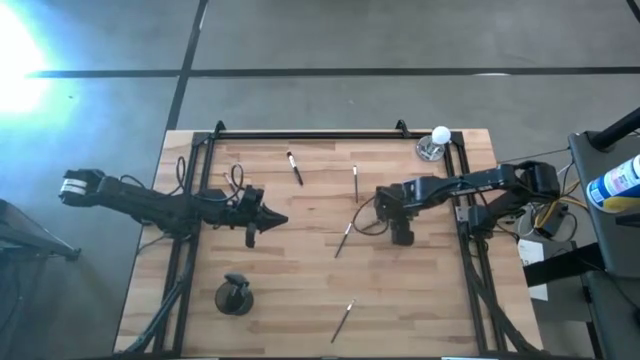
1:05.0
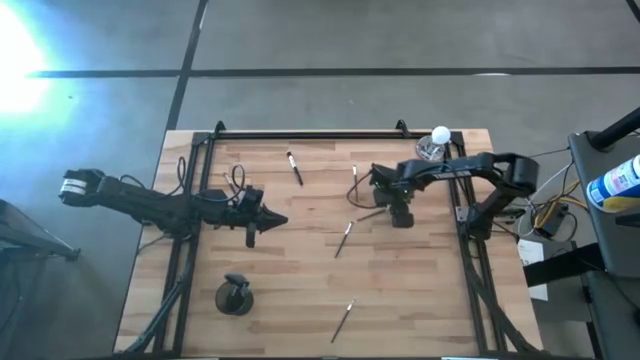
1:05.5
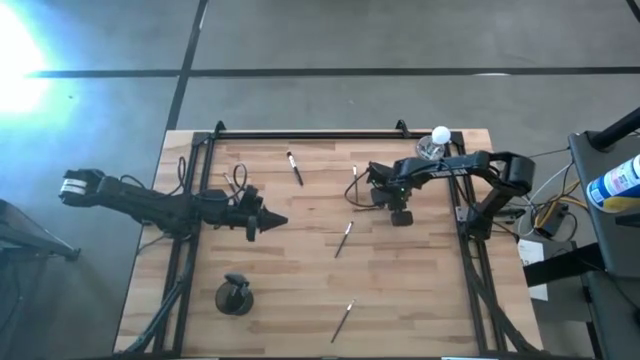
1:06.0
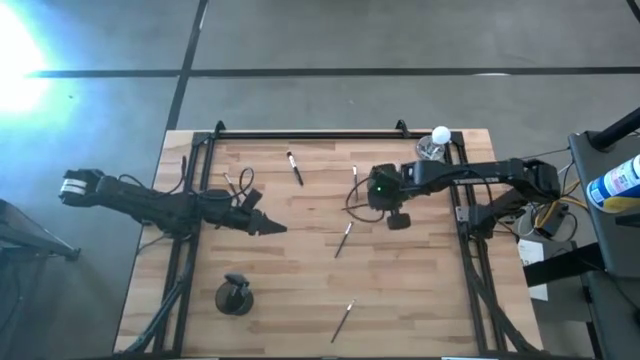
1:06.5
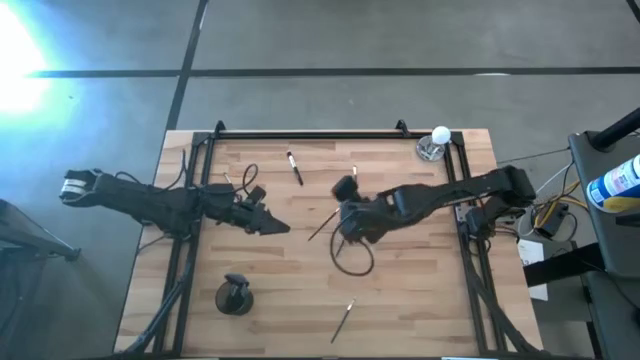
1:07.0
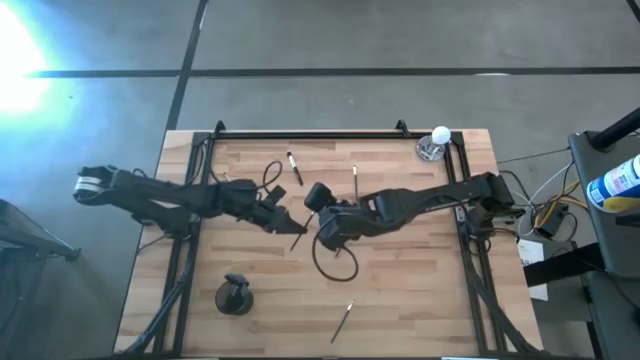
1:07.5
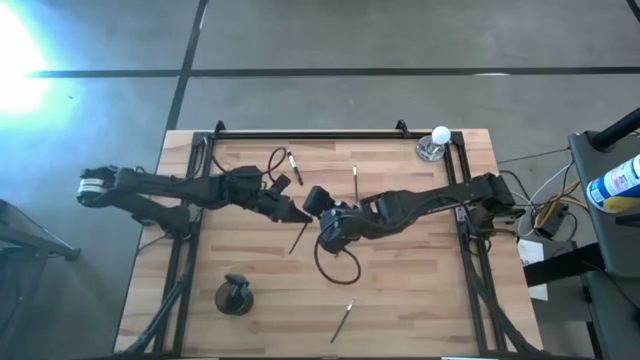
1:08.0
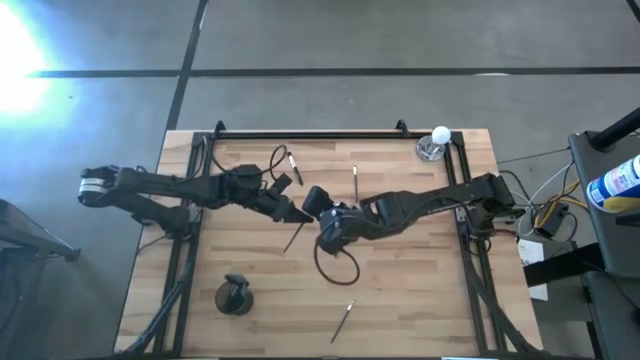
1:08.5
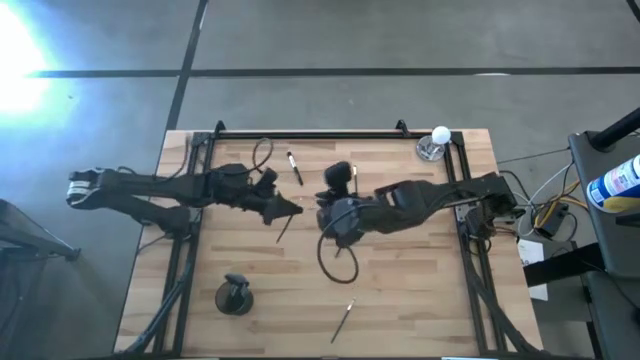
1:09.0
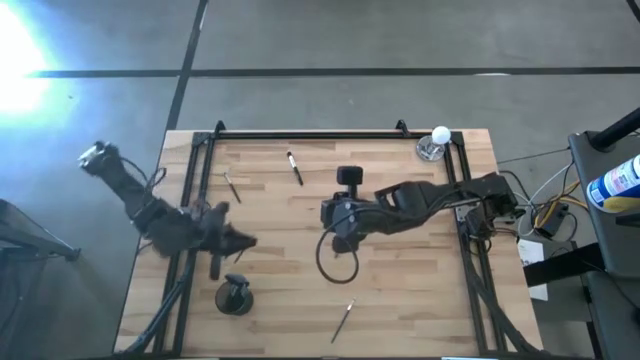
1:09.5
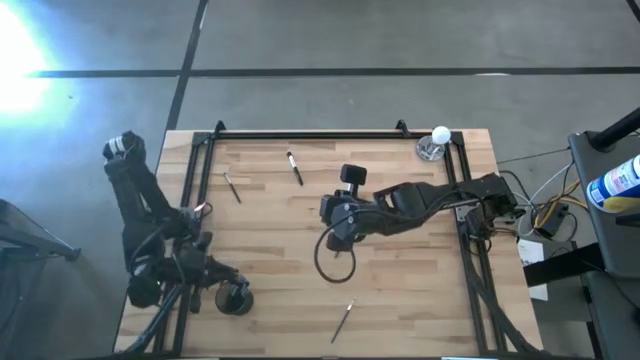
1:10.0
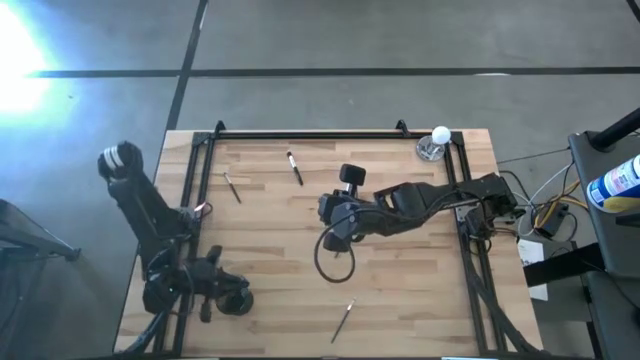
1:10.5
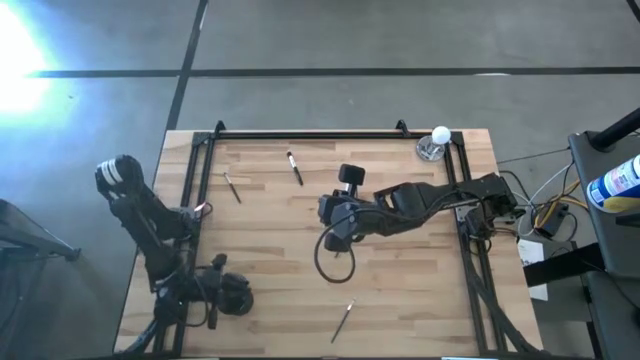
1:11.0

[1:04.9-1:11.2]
Task: Pick & Place Makeup Brushes
Put the liner brush into the holder

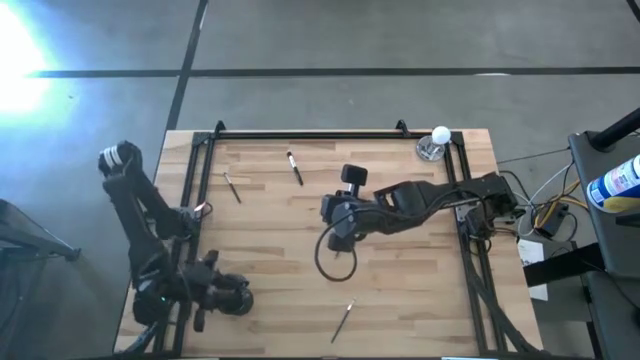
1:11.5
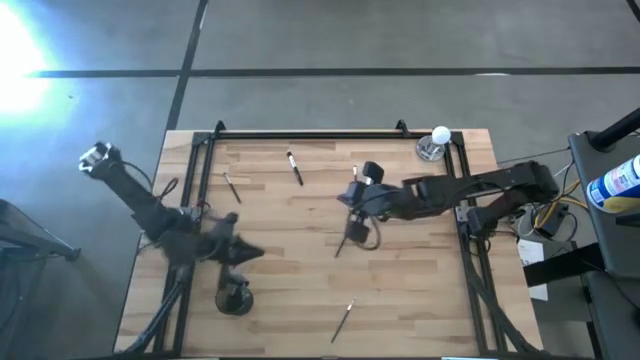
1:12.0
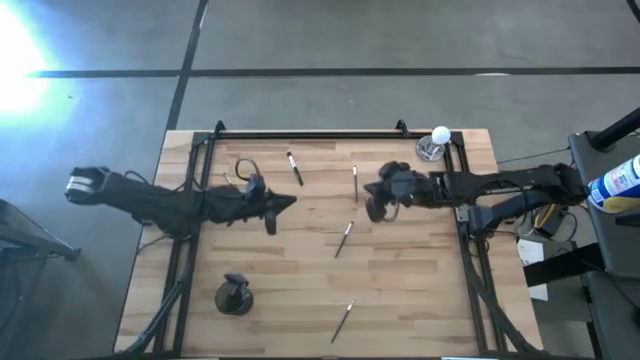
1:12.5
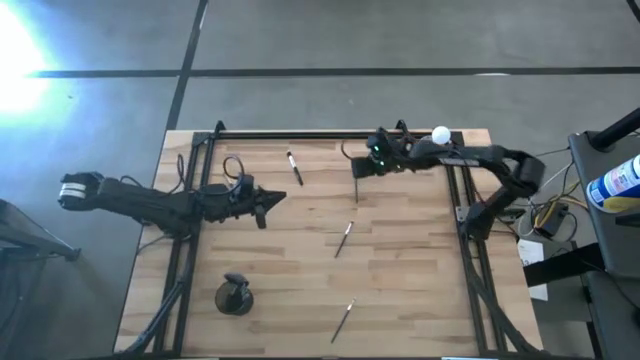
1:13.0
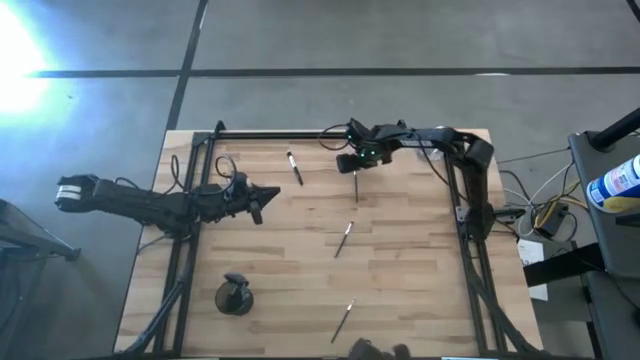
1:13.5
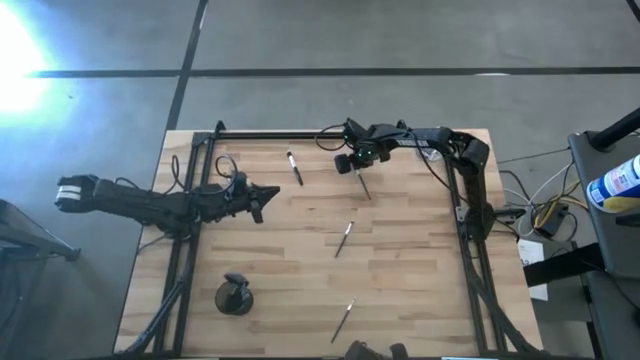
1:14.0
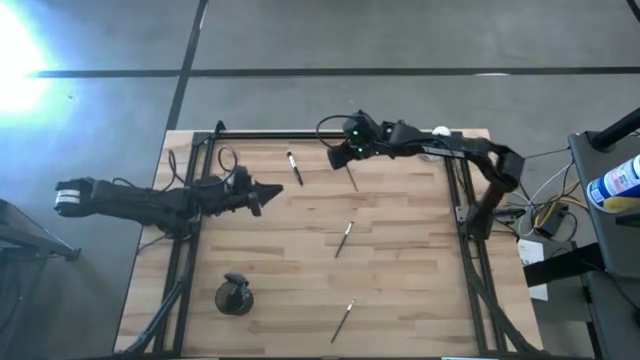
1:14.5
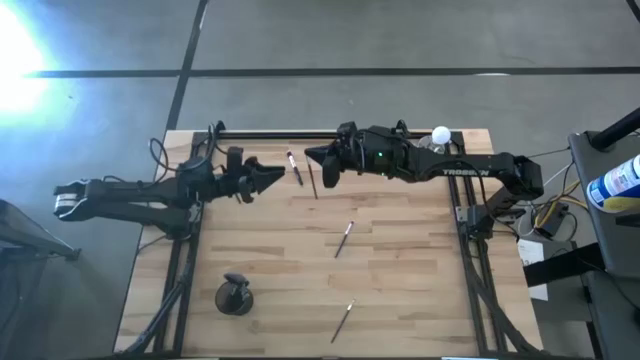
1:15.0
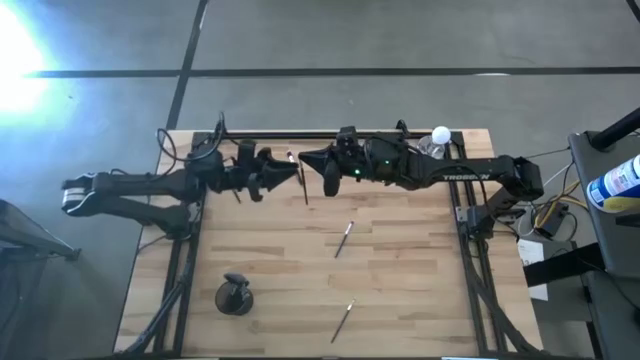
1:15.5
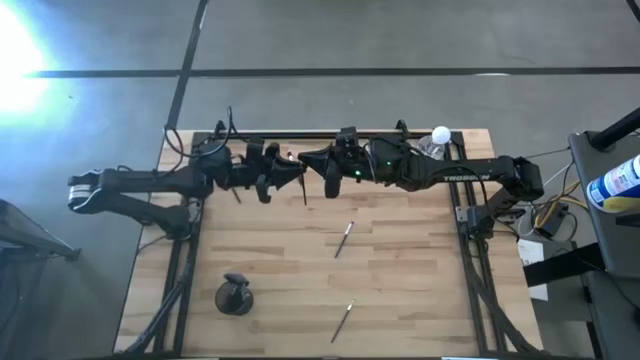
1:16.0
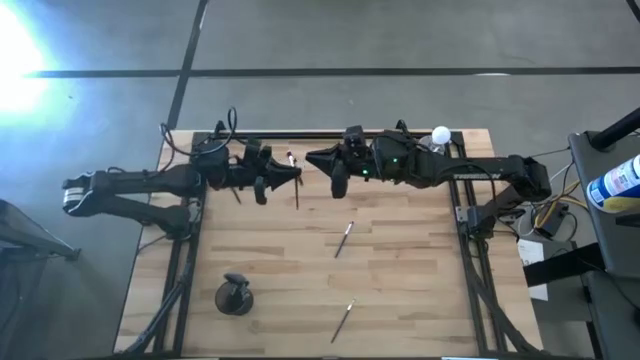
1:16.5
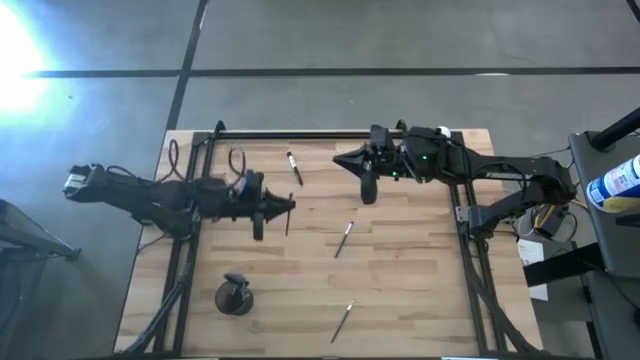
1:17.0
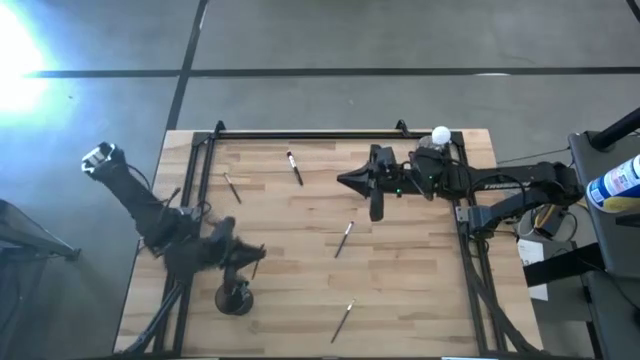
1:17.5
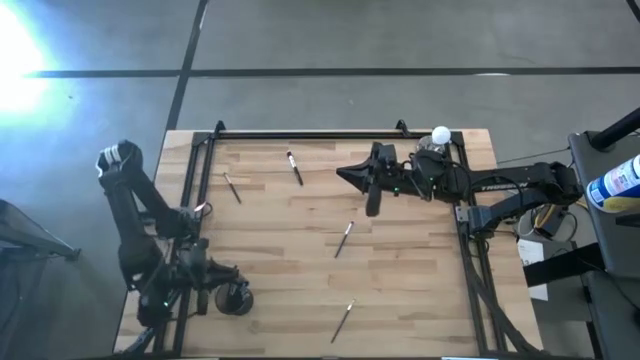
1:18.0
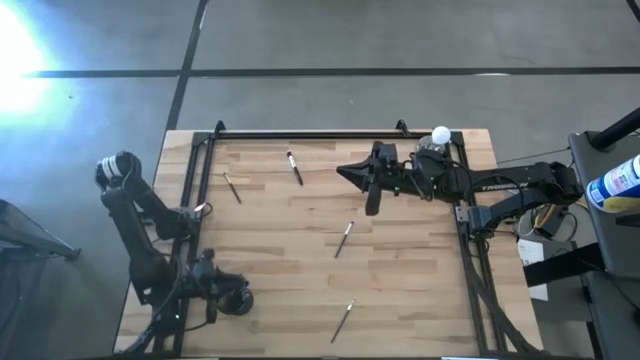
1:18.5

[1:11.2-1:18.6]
Put the eyeshadow brush into the holder

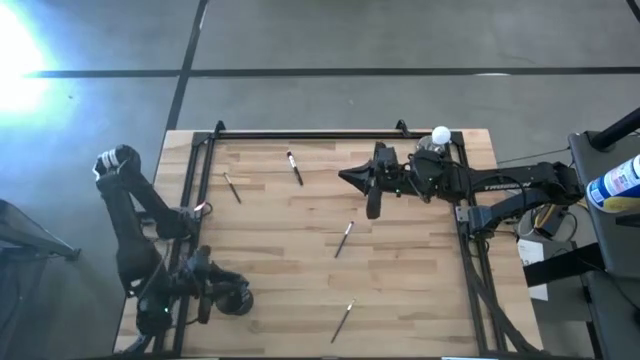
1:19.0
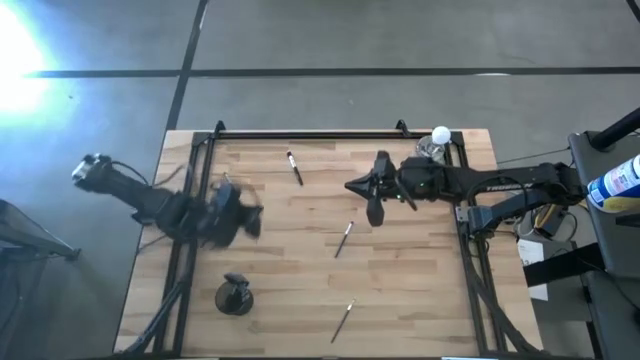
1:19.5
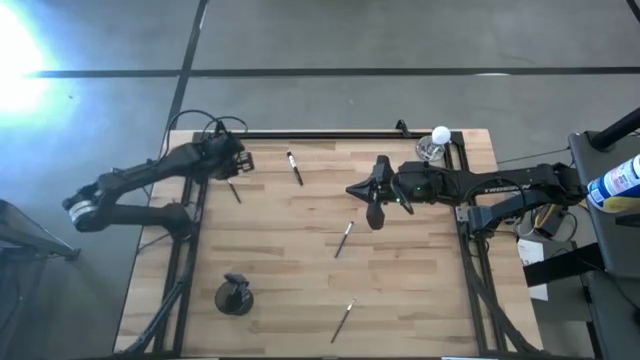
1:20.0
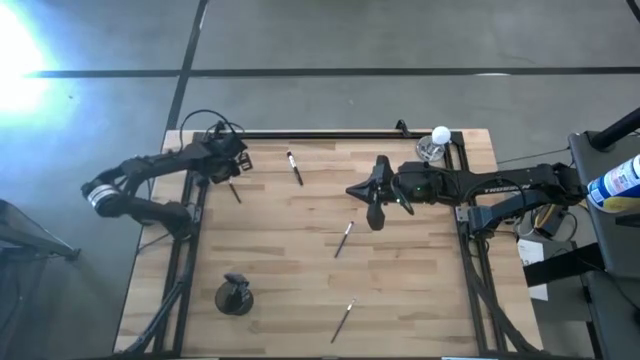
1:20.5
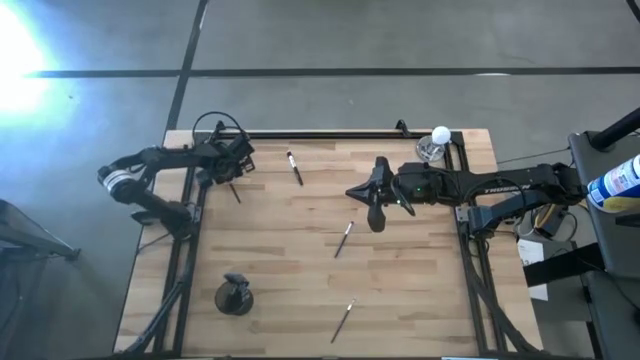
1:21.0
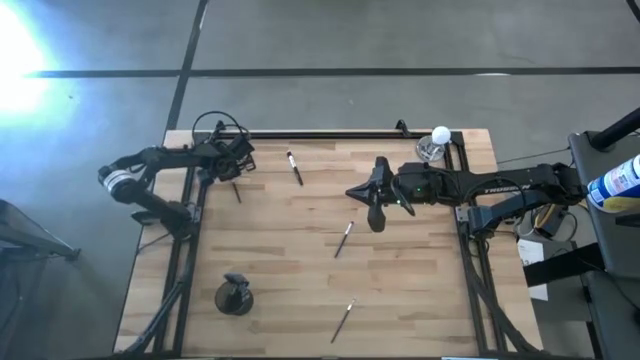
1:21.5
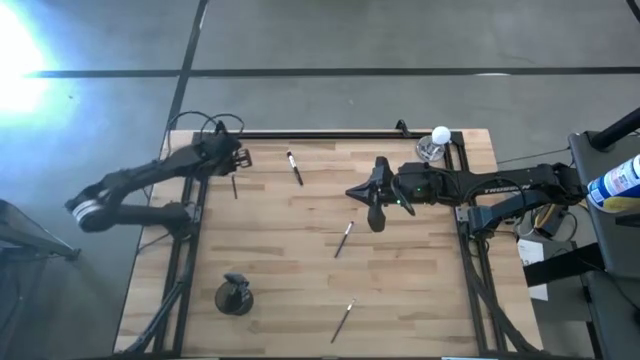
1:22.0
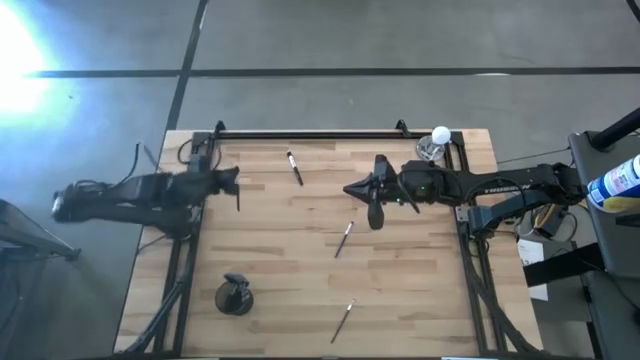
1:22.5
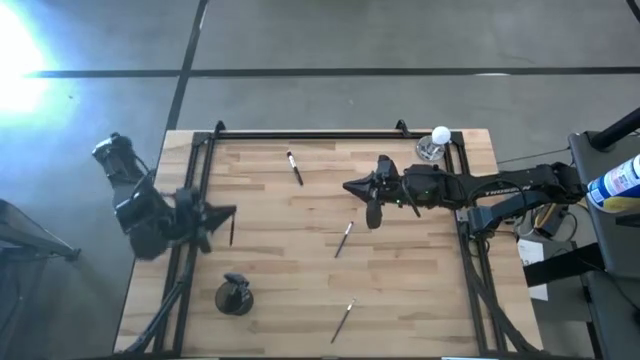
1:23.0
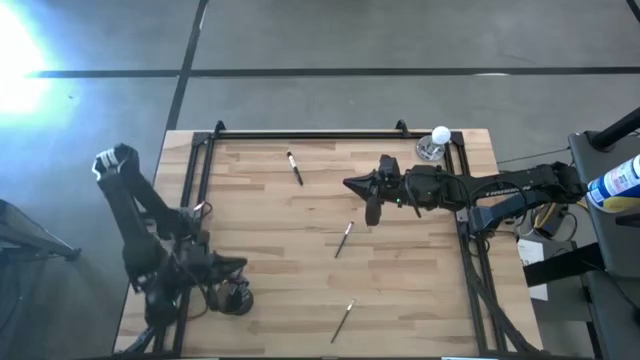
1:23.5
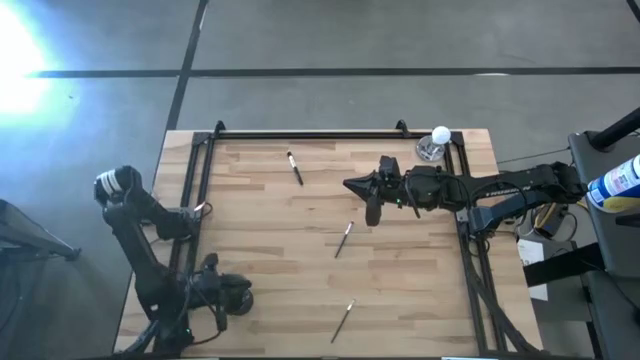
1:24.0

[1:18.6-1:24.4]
Put the eyeshadow brush into the holder

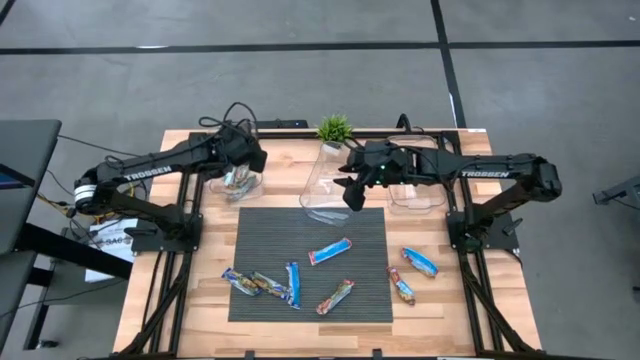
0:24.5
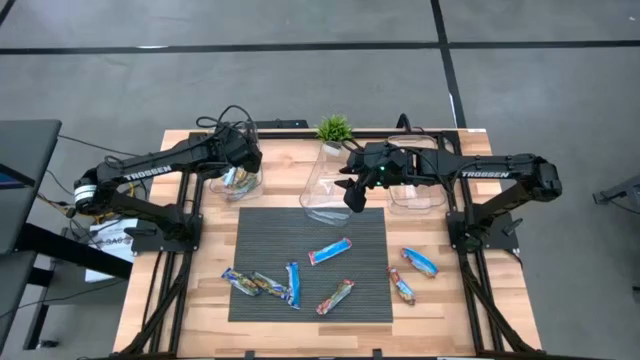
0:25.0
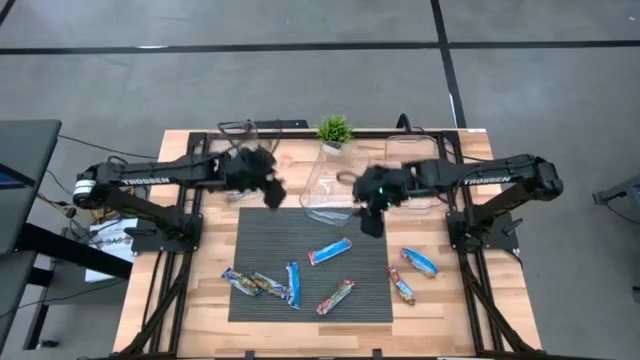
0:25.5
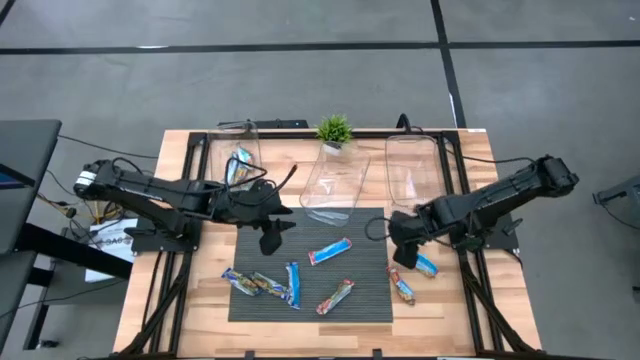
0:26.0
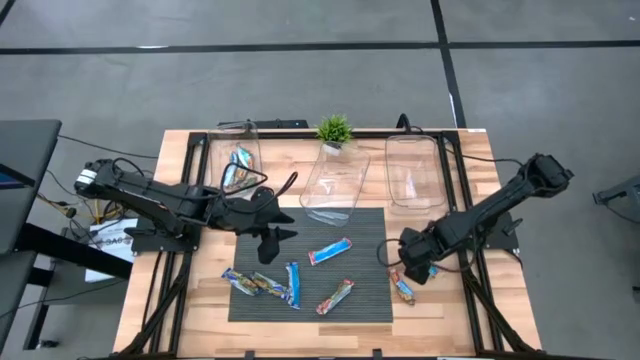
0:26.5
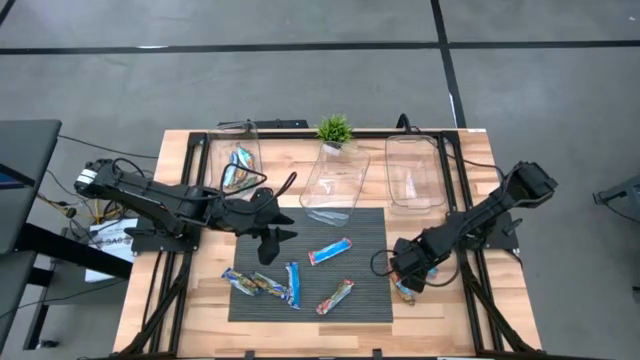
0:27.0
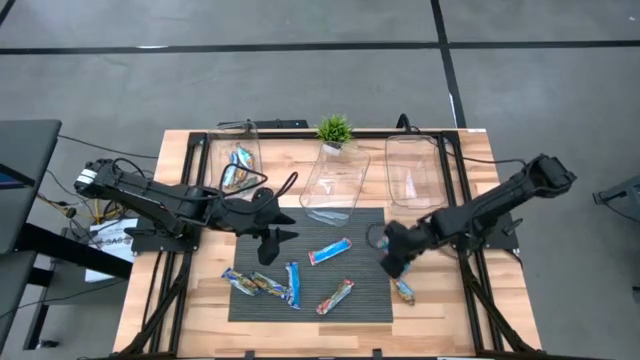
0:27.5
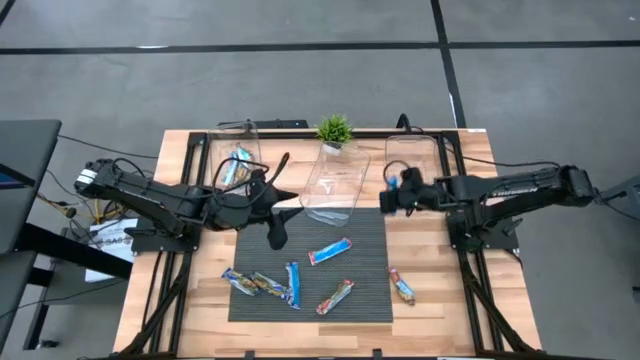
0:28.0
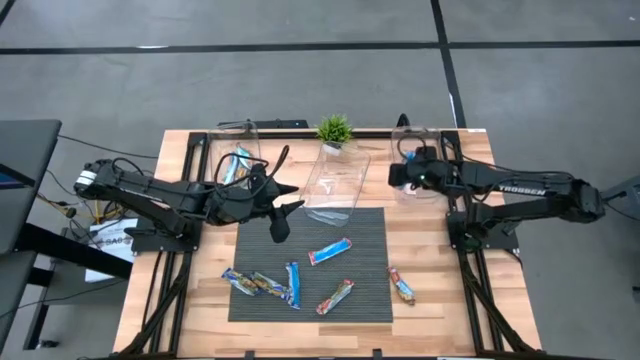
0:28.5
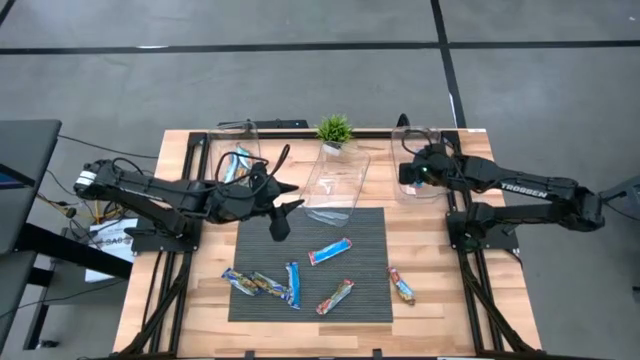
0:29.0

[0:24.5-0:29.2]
Task: Pick and place Granola Bars by type
Put the red granola bar into the right transparent bin
